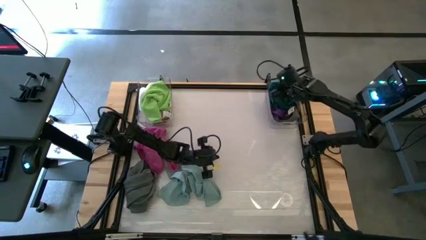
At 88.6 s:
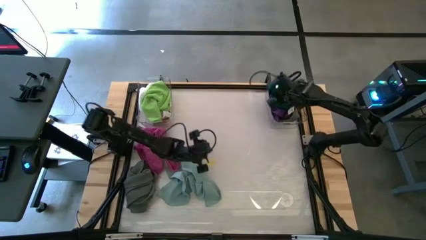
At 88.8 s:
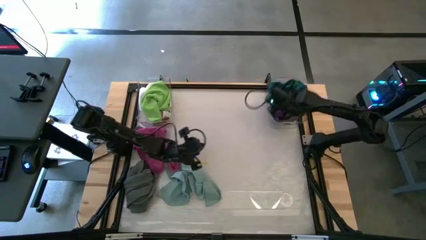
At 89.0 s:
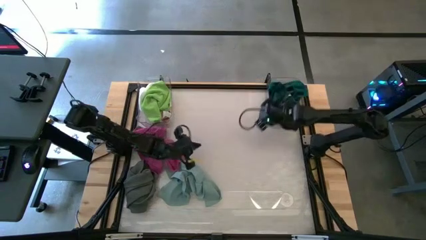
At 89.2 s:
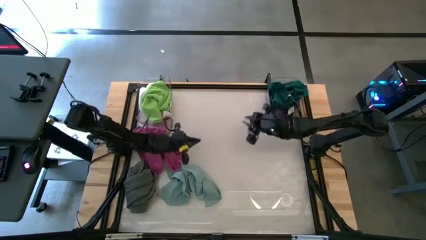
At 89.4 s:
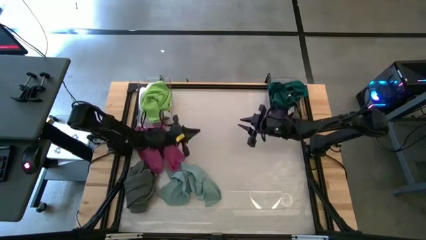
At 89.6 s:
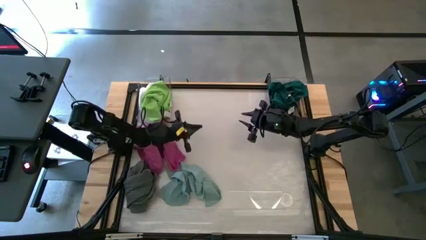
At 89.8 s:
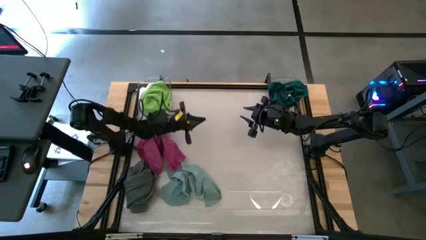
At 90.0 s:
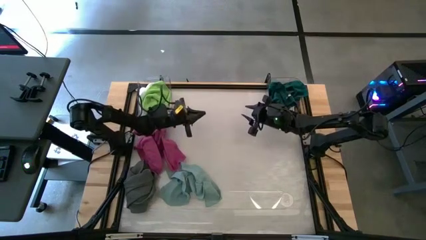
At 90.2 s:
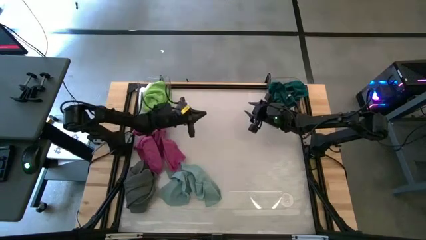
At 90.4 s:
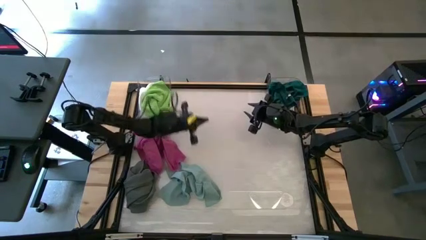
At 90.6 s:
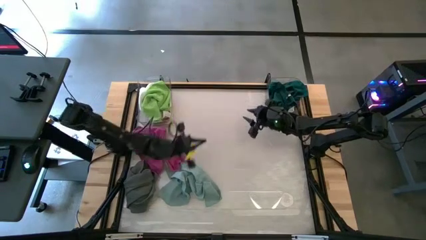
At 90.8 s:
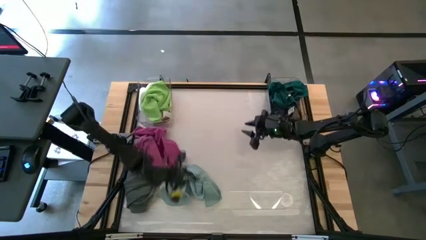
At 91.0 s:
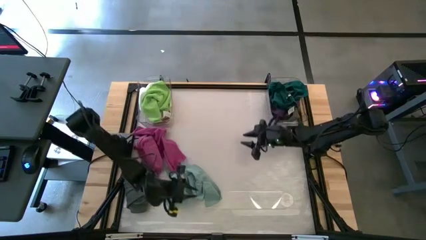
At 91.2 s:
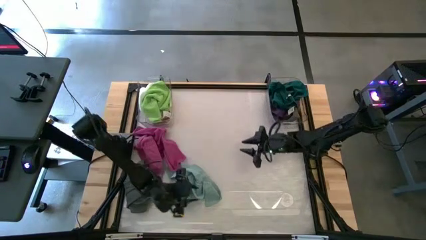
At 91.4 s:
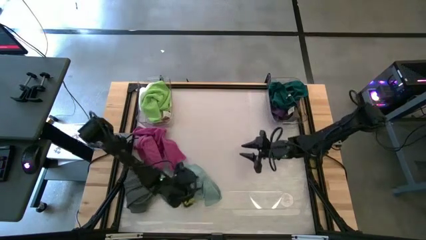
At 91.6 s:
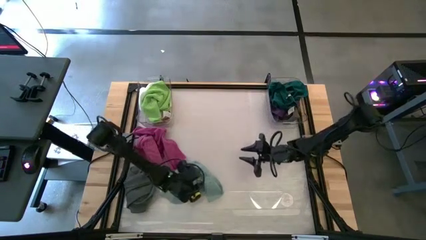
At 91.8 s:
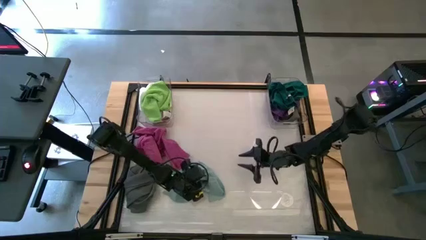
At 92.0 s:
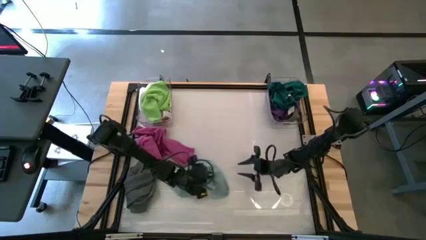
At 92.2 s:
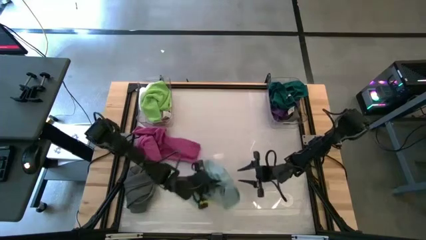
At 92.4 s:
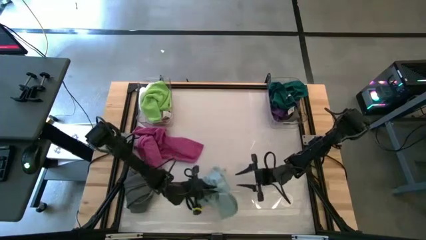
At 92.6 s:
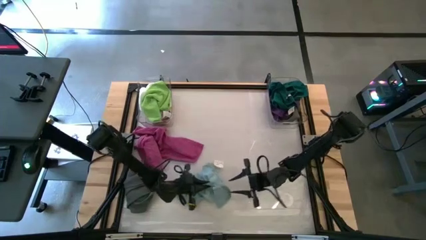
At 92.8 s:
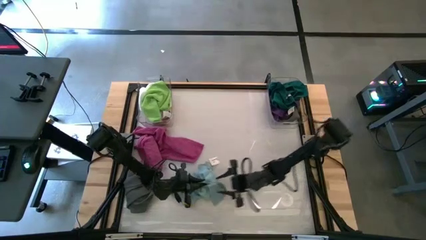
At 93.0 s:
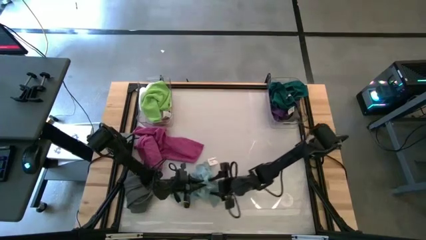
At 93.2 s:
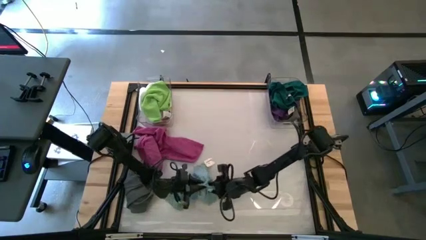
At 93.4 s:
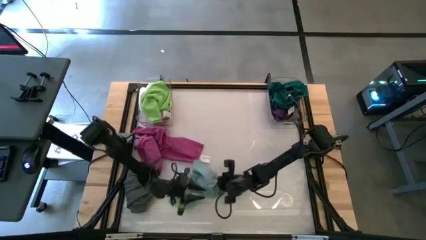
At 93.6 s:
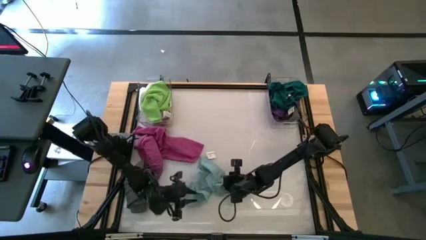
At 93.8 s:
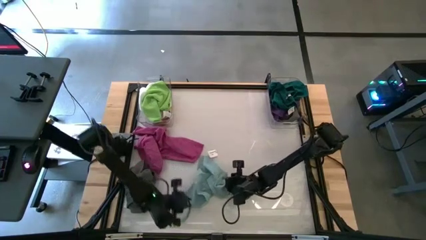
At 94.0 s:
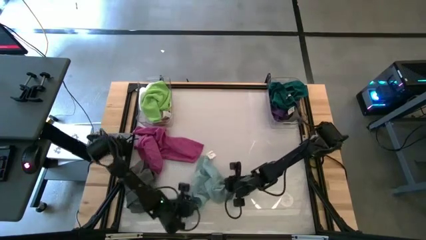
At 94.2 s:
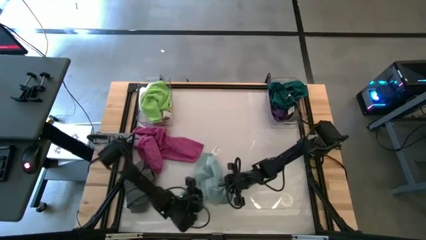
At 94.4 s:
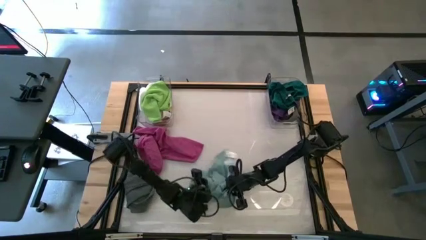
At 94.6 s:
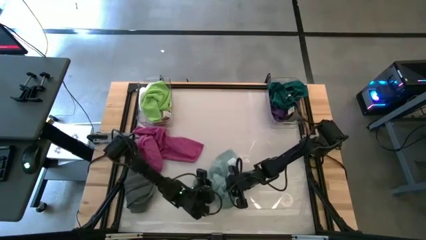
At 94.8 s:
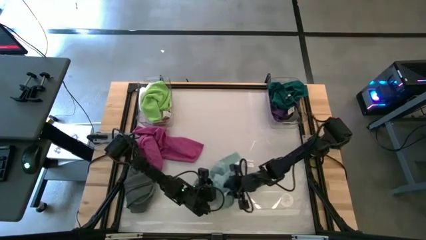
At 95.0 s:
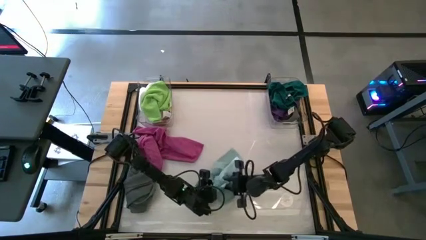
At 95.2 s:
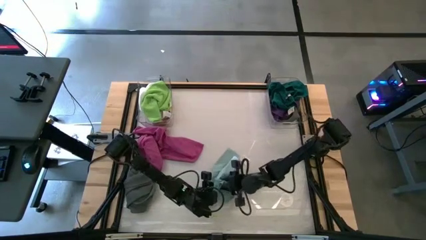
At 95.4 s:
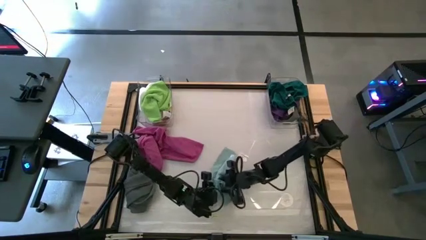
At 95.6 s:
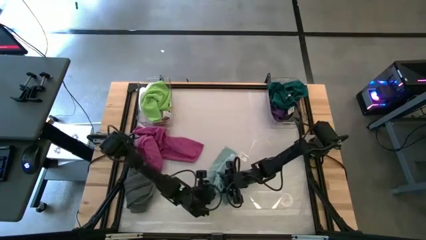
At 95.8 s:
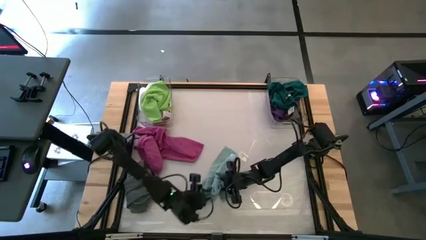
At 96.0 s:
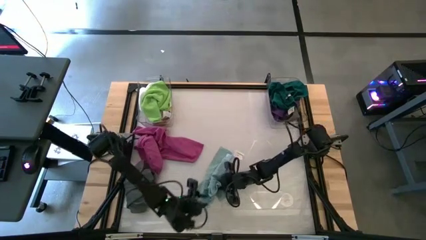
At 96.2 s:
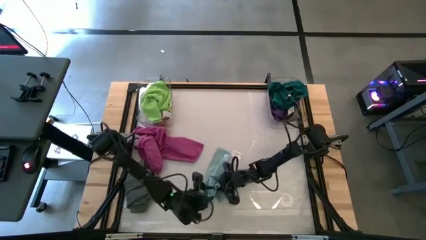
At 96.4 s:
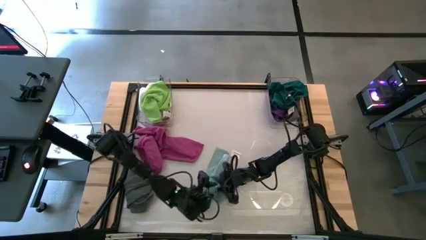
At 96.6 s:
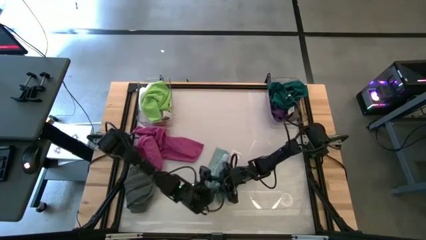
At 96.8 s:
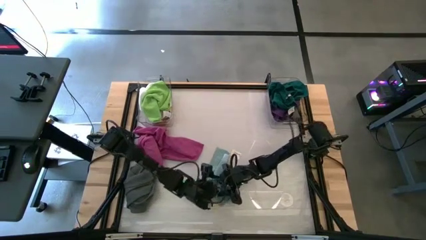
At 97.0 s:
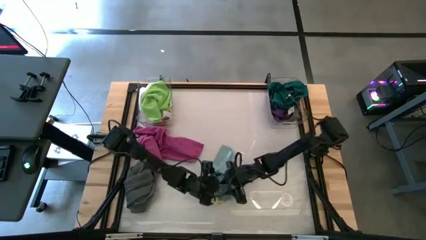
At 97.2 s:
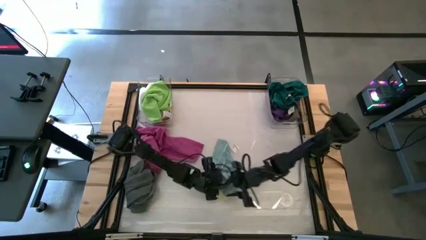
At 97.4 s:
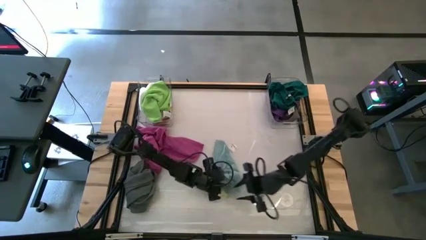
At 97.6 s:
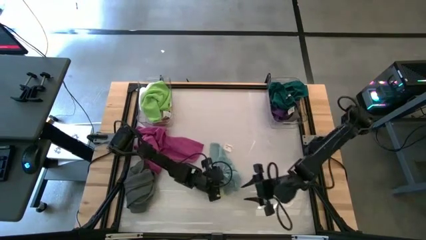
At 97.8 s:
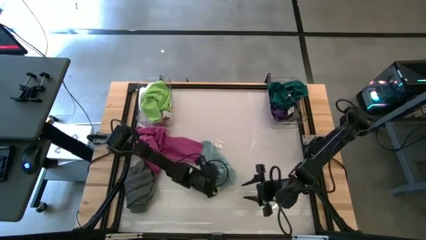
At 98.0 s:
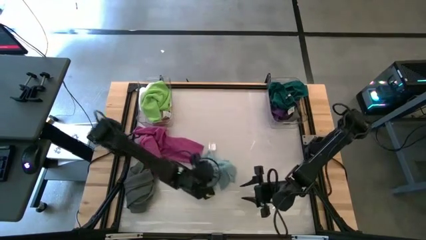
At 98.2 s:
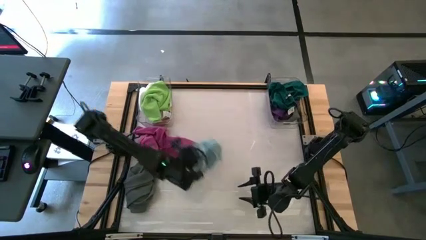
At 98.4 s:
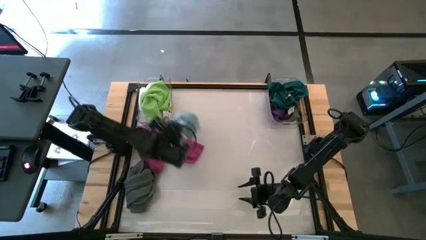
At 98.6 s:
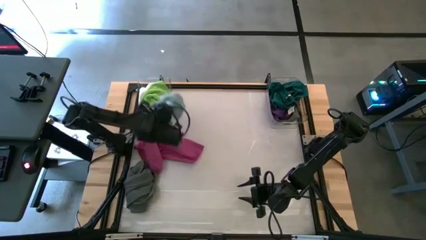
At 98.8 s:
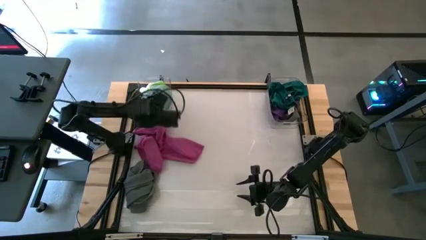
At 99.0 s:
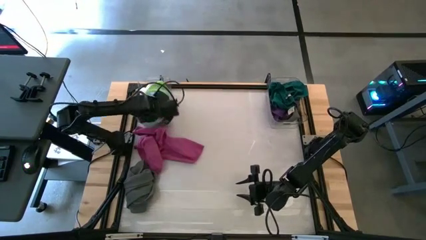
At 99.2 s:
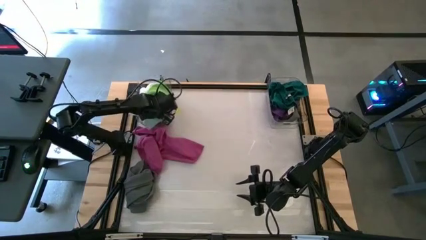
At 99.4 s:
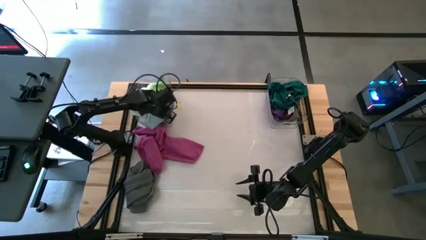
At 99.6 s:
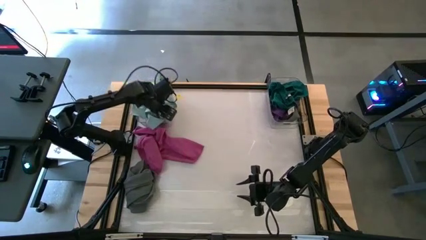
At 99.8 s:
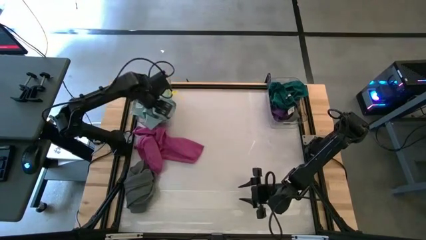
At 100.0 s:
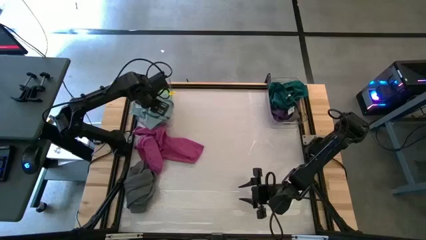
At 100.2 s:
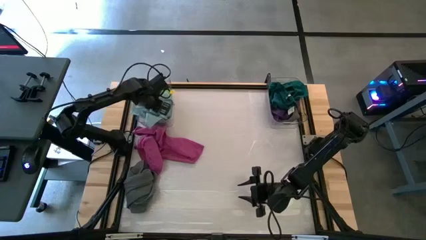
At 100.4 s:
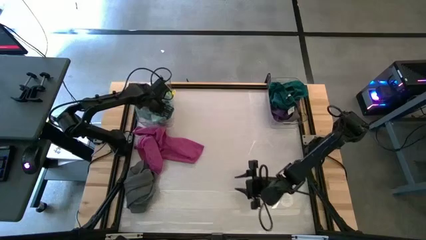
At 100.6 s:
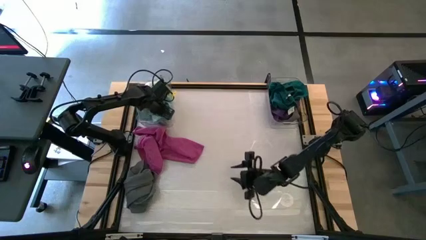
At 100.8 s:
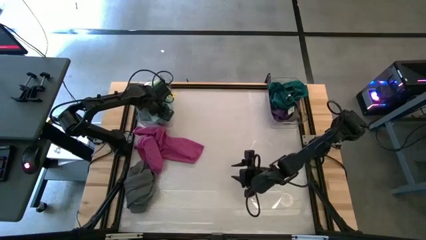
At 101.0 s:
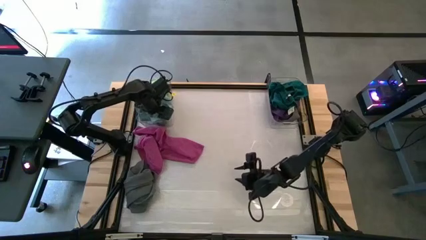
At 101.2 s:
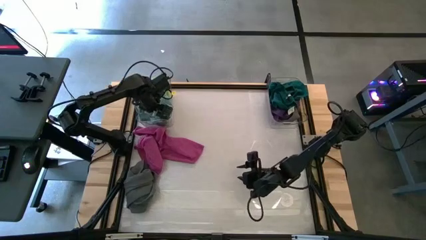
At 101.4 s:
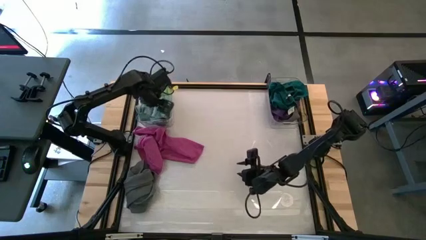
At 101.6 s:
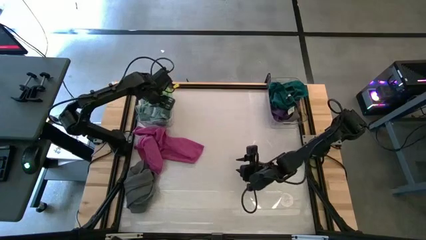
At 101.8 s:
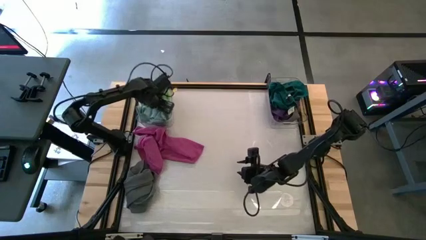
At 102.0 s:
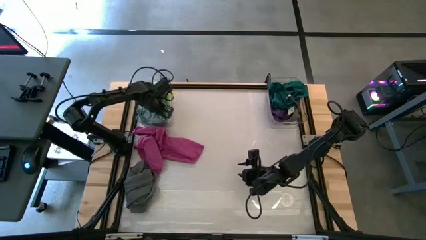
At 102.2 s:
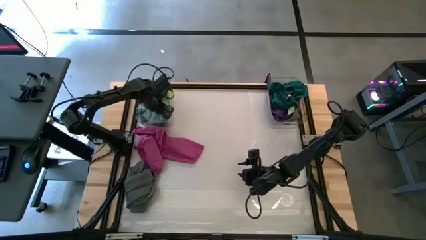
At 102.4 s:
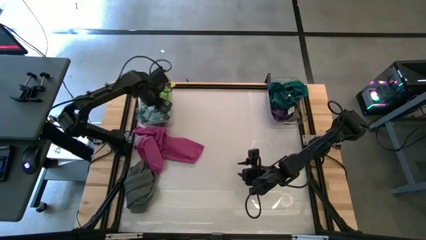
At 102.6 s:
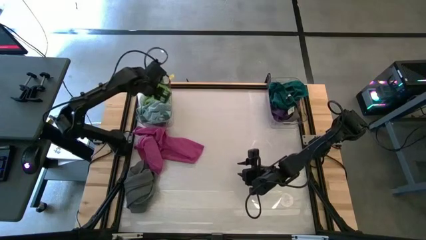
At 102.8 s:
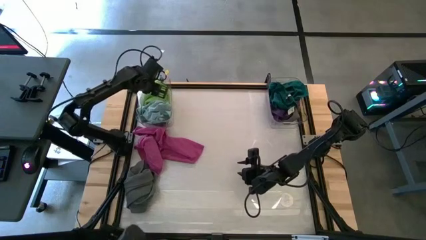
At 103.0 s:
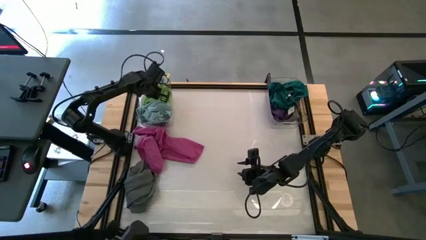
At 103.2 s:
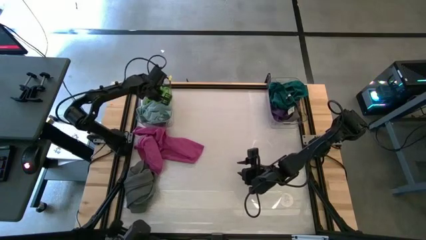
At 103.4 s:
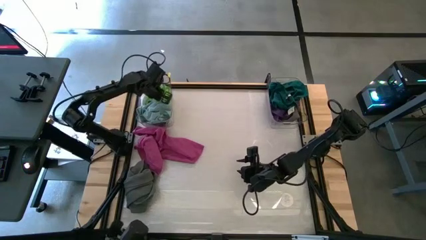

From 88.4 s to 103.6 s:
Task: Sort towels by color in basket
Put the light blue towel into the left transparent bin
